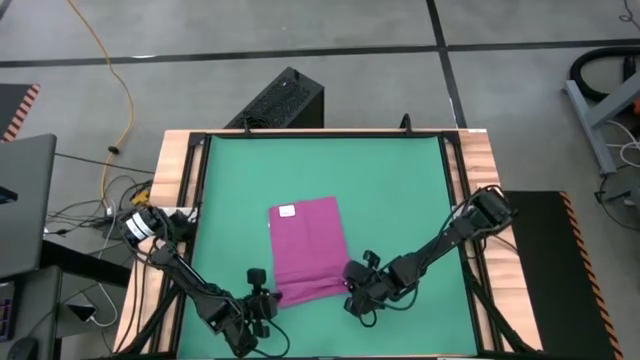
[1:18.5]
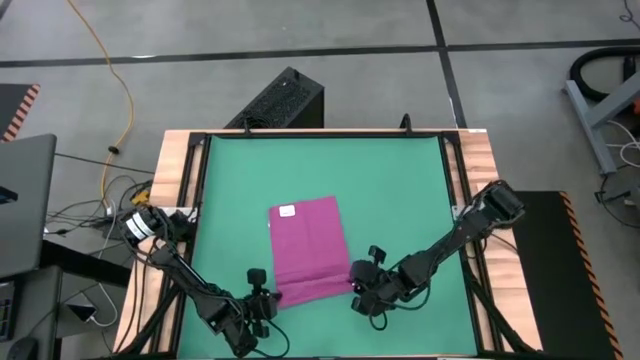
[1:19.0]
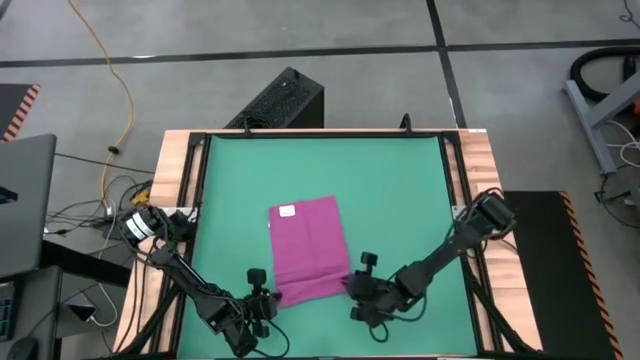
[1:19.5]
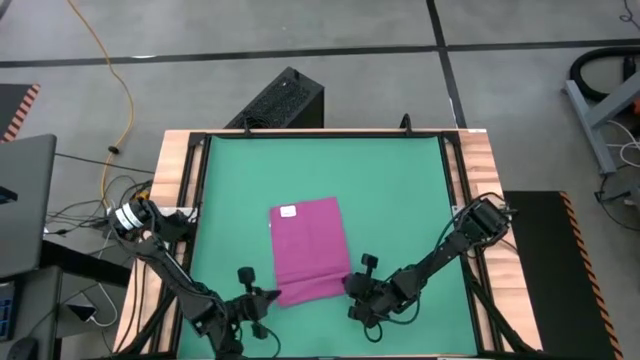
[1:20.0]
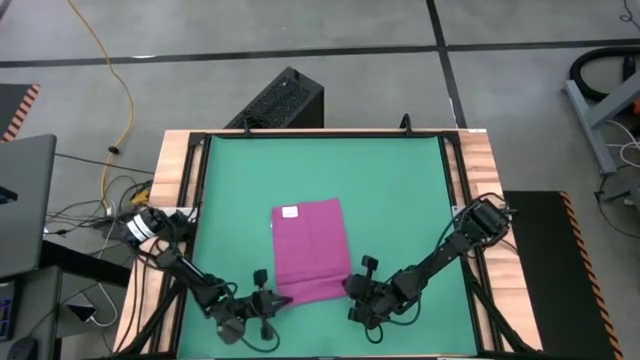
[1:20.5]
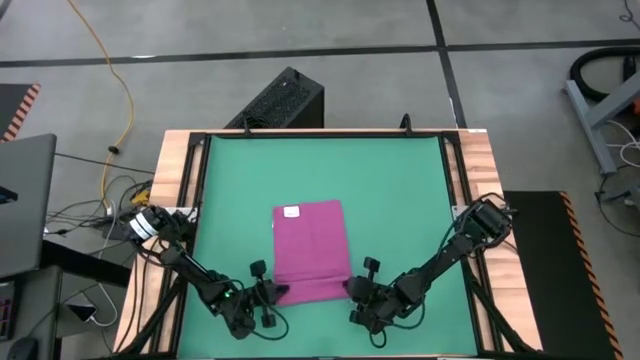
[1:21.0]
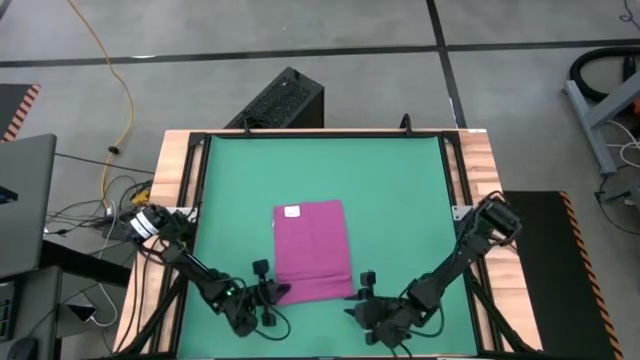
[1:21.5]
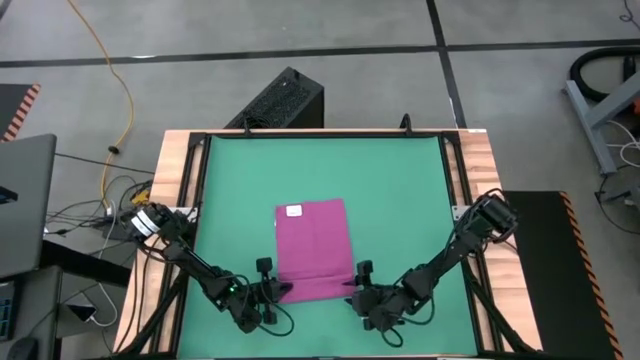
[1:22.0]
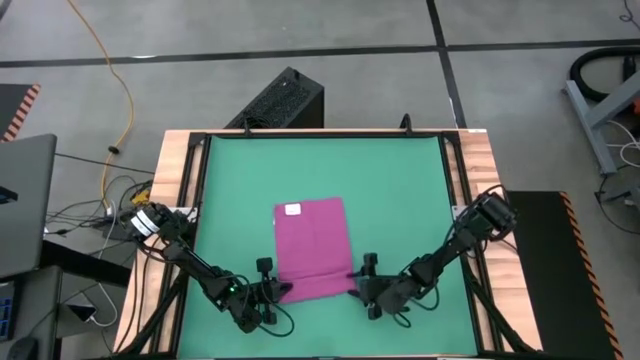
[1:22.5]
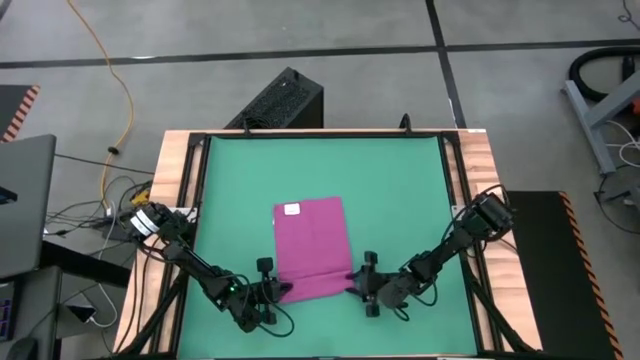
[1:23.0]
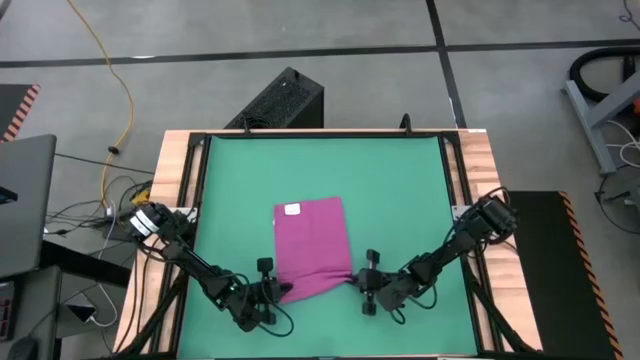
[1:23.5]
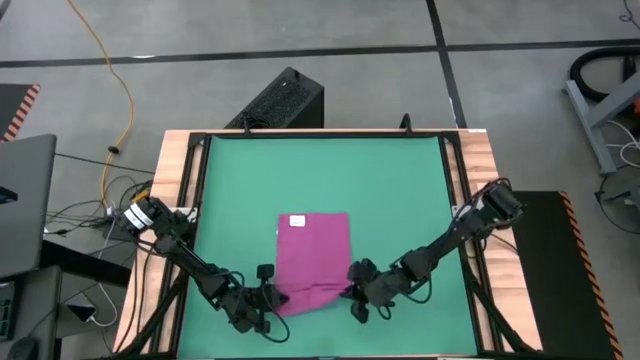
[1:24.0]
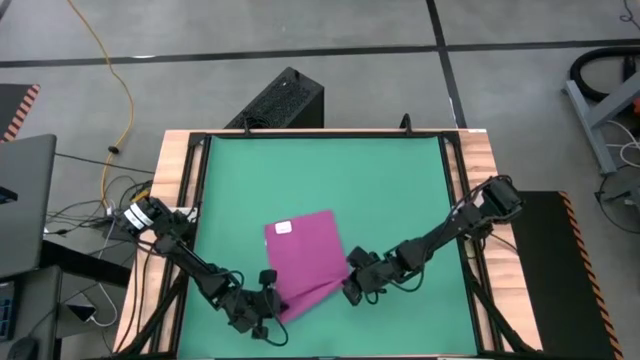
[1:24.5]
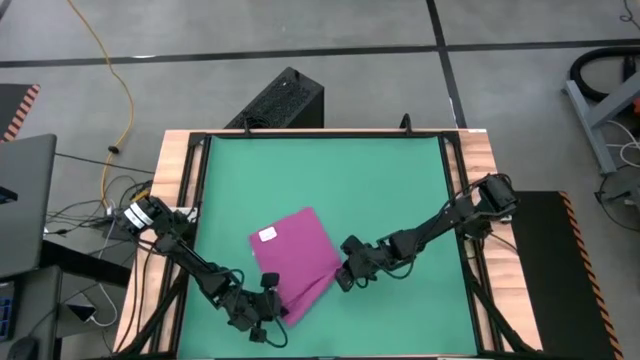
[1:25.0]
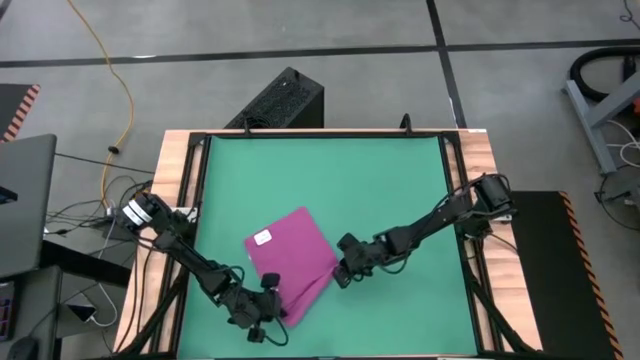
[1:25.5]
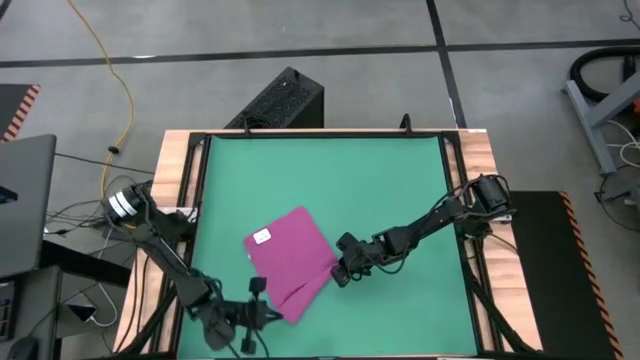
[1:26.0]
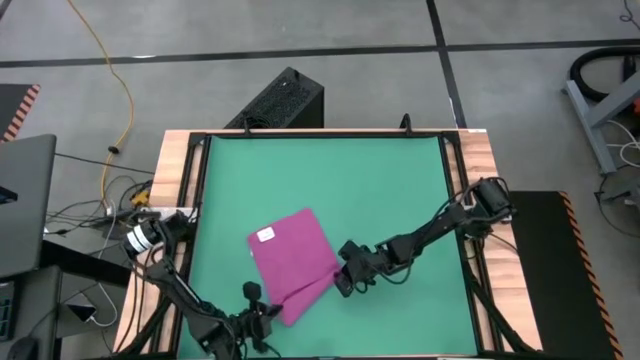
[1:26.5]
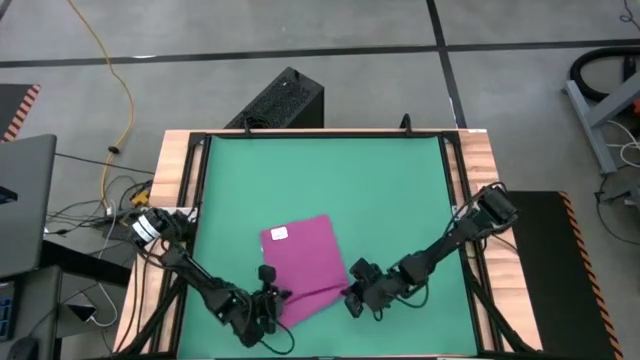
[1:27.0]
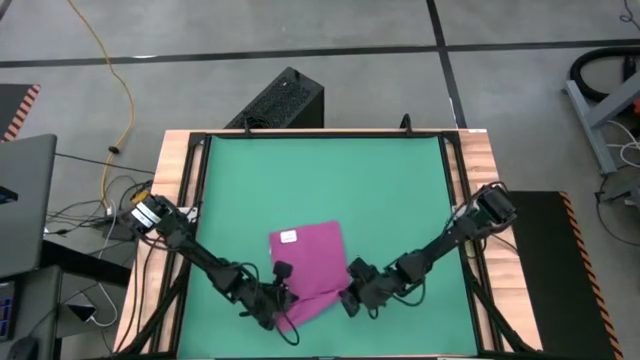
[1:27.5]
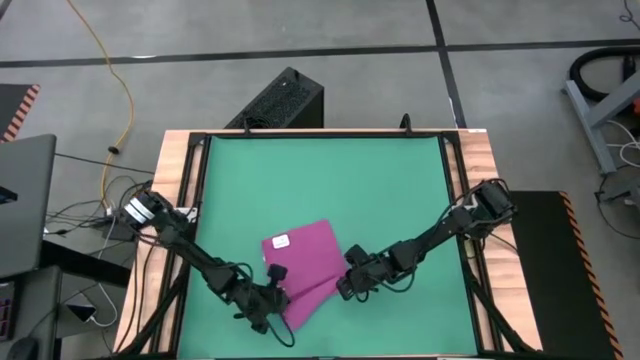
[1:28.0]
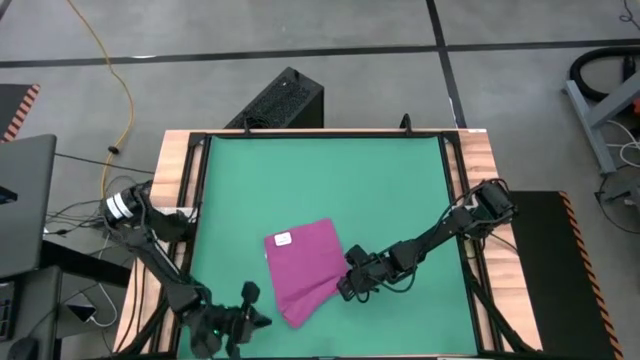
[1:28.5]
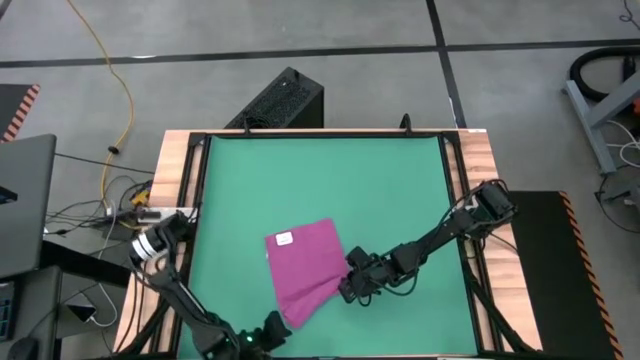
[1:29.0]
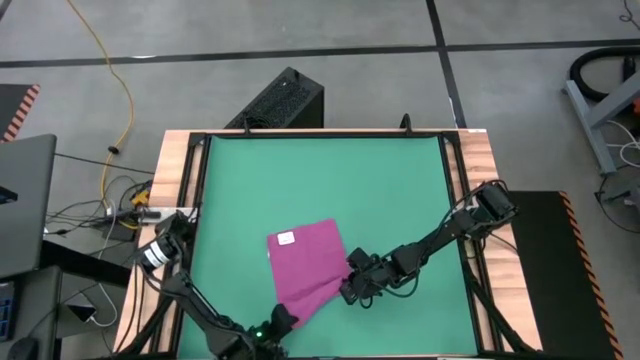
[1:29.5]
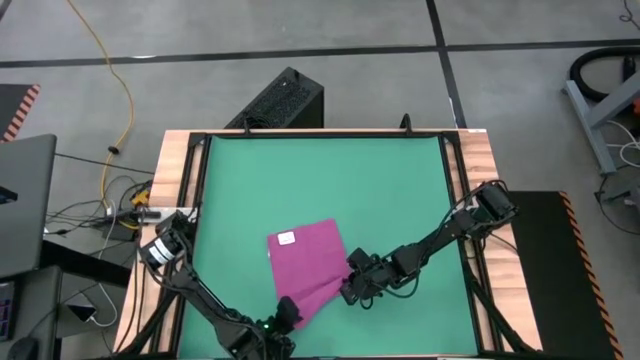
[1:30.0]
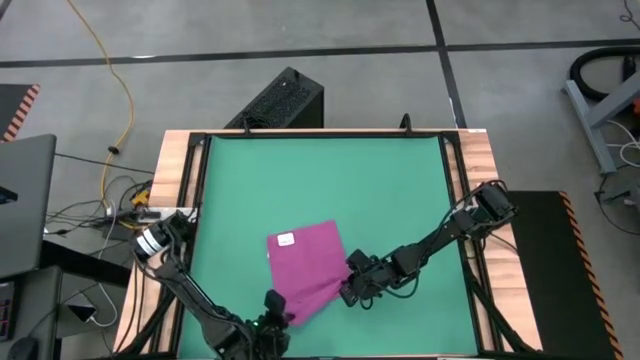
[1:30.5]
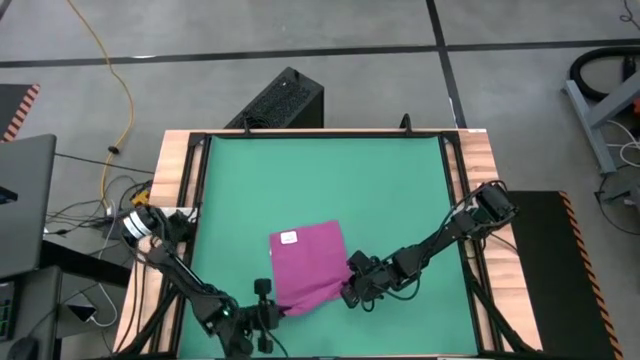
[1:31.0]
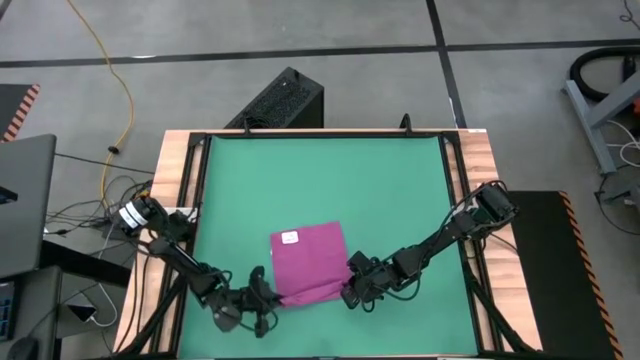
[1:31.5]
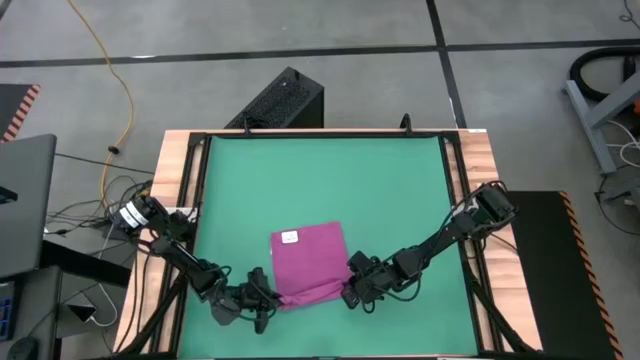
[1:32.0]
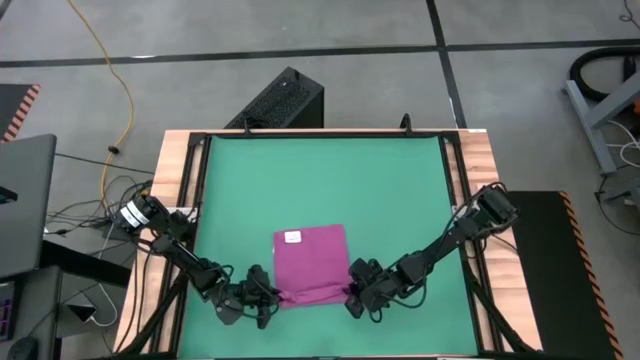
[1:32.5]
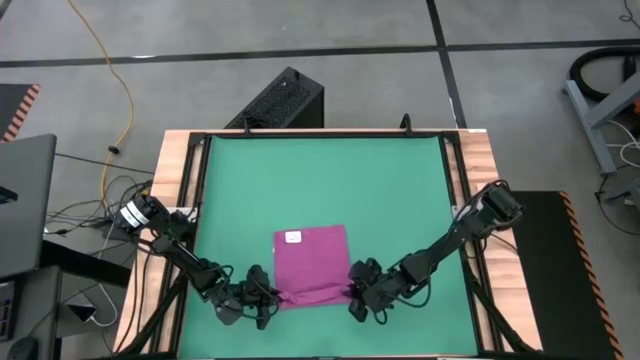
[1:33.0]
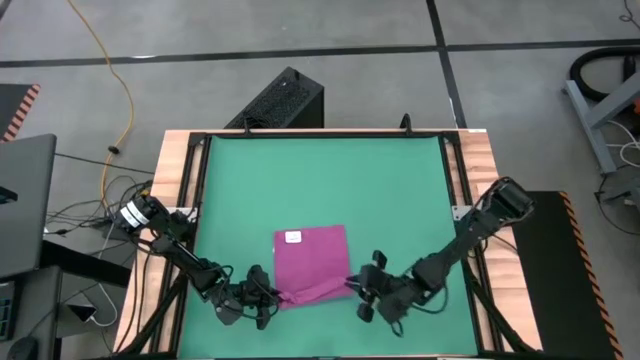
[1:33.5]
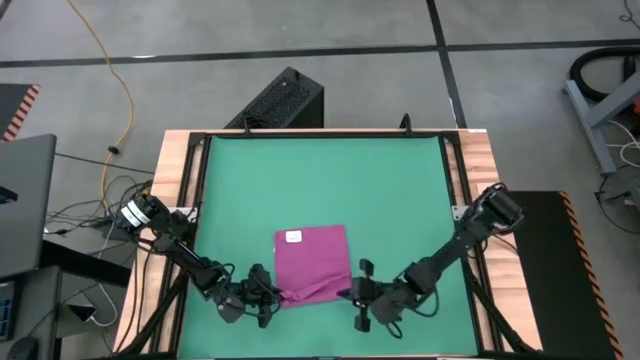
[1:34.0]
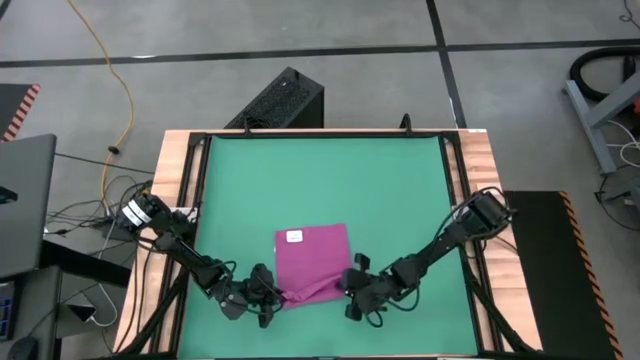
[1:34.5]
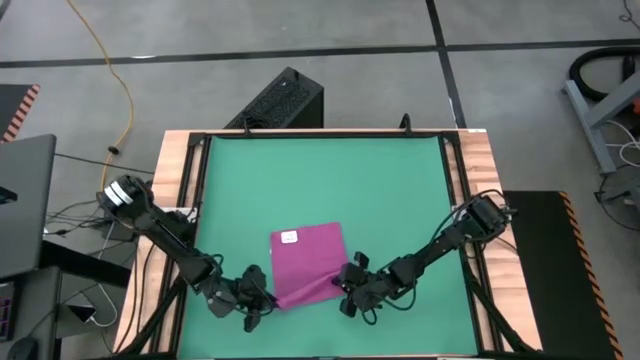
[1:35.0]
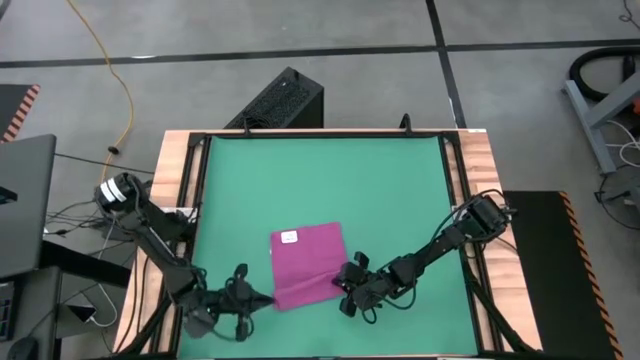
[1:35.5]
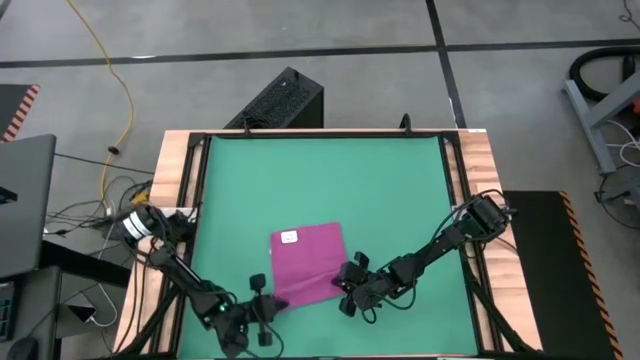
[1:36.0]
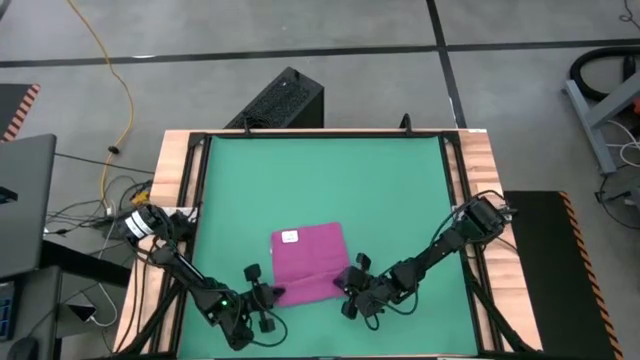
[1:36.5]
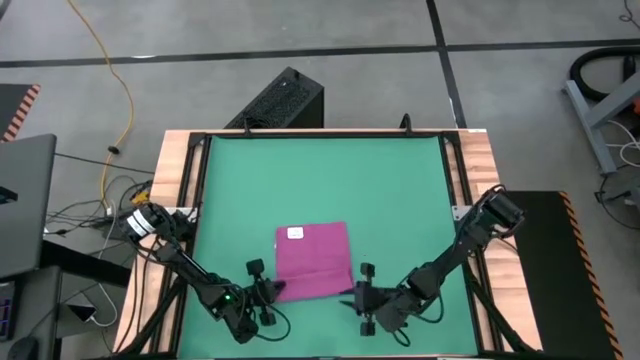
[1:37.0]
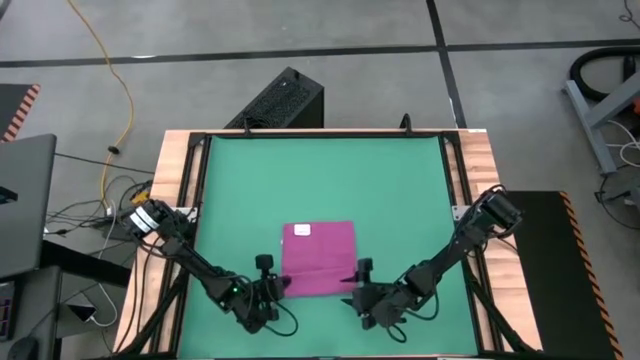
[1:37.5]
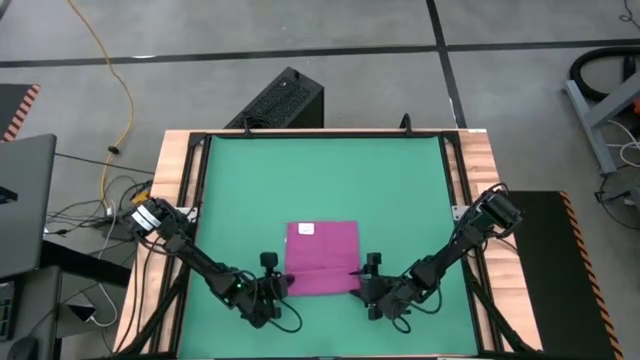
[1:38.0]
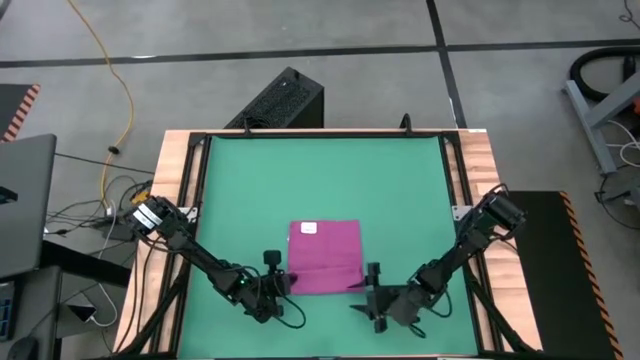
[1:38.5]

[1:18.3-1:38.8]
Task: Roll towel
Roll the pink towel
